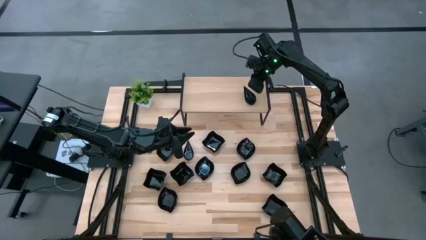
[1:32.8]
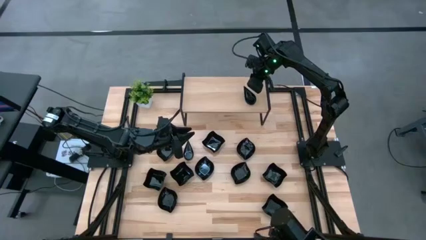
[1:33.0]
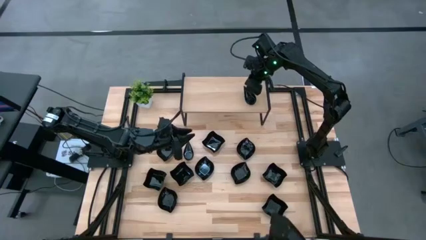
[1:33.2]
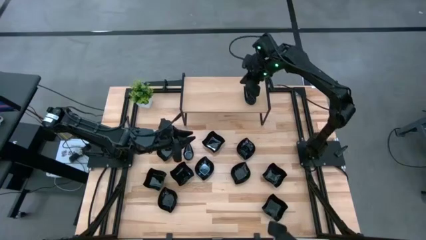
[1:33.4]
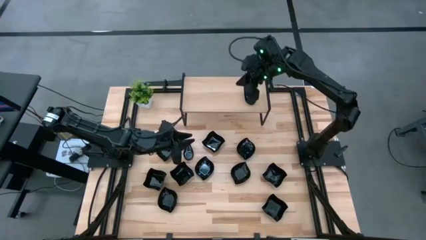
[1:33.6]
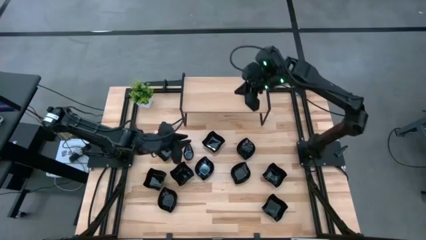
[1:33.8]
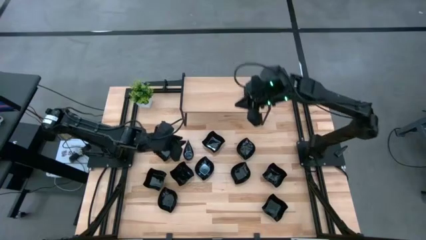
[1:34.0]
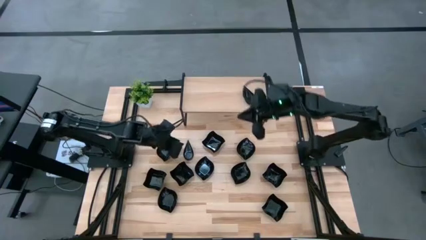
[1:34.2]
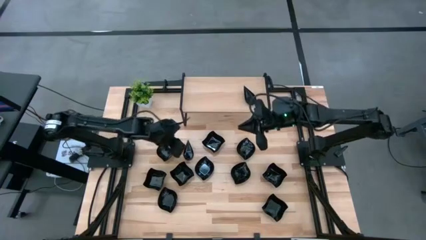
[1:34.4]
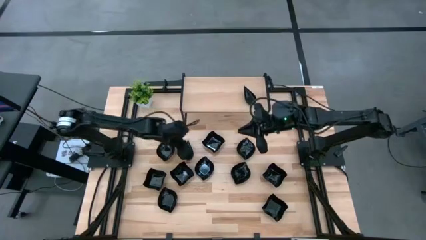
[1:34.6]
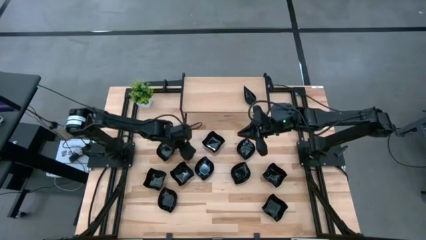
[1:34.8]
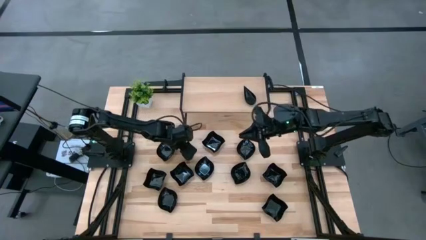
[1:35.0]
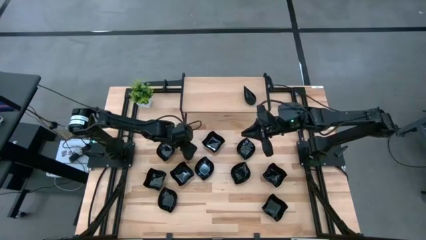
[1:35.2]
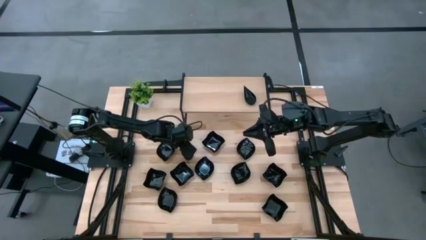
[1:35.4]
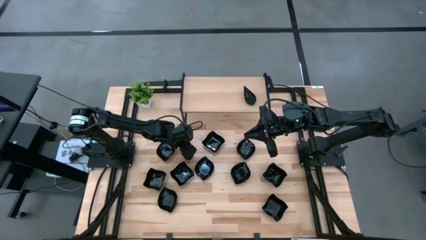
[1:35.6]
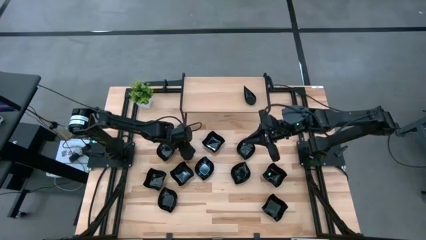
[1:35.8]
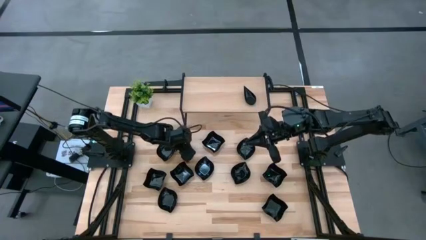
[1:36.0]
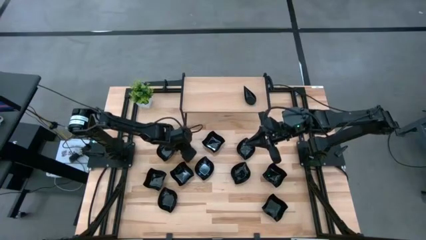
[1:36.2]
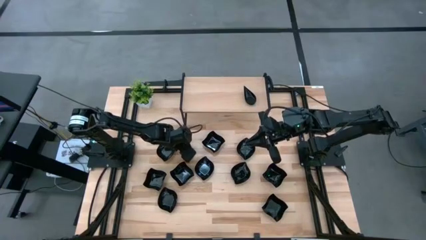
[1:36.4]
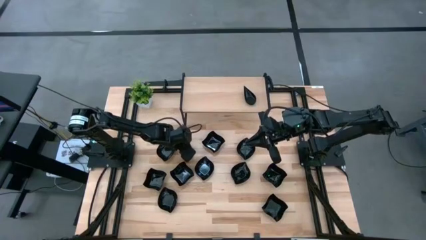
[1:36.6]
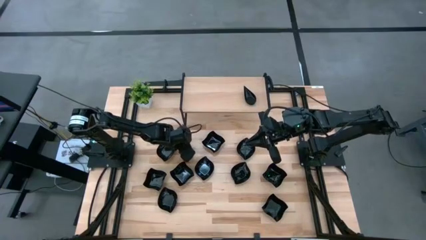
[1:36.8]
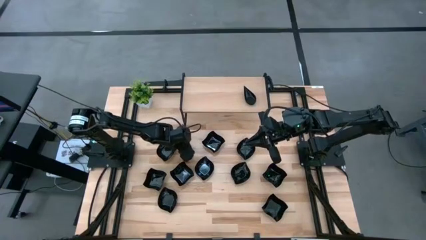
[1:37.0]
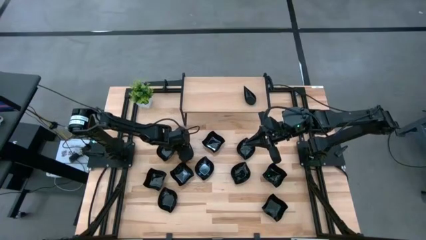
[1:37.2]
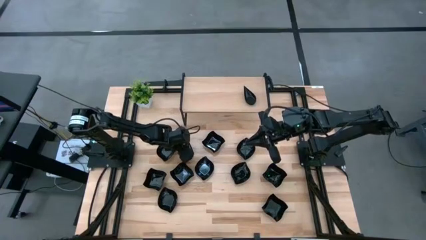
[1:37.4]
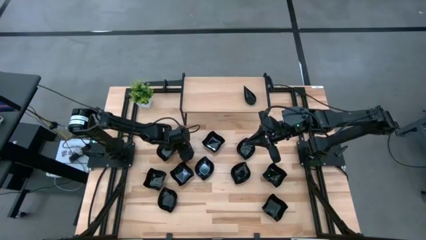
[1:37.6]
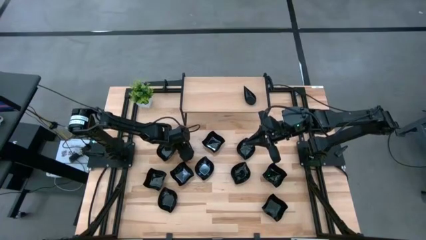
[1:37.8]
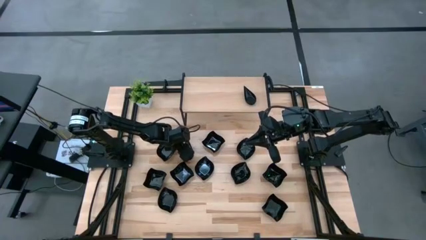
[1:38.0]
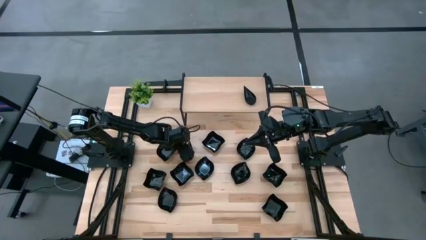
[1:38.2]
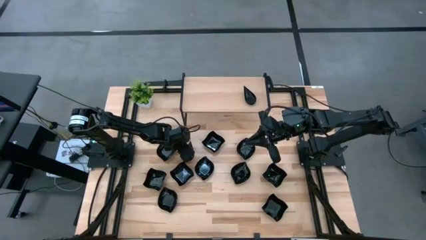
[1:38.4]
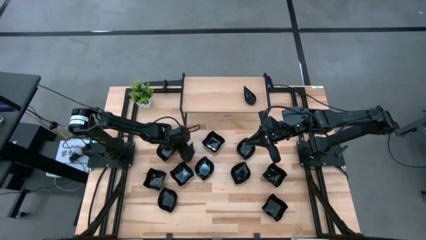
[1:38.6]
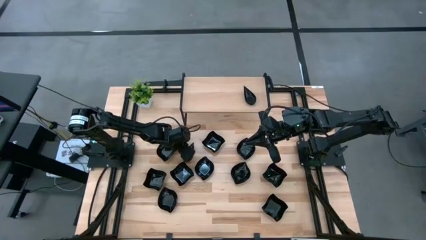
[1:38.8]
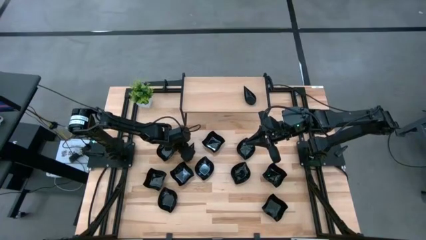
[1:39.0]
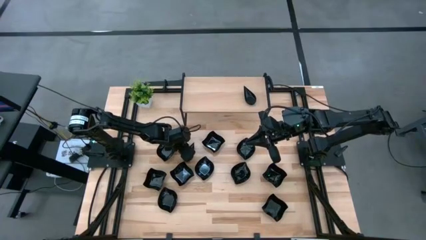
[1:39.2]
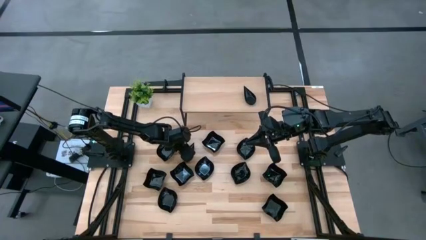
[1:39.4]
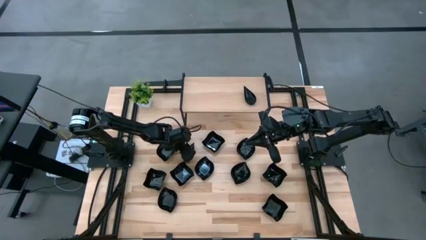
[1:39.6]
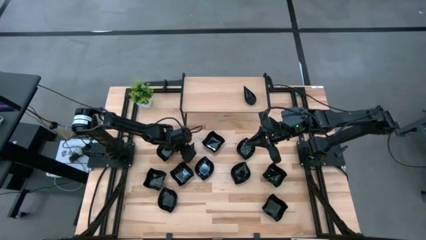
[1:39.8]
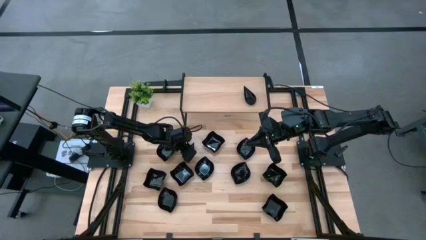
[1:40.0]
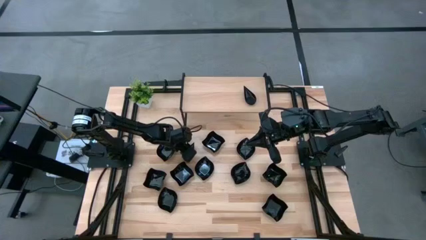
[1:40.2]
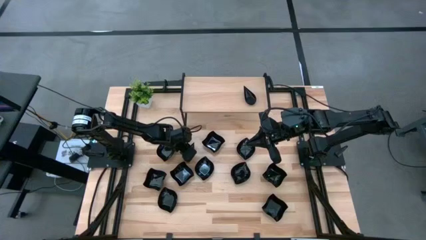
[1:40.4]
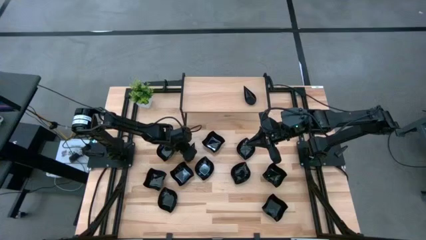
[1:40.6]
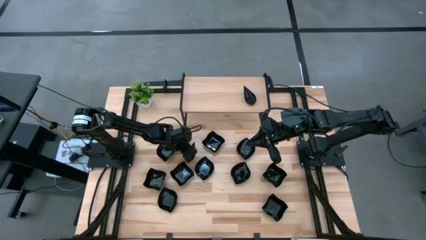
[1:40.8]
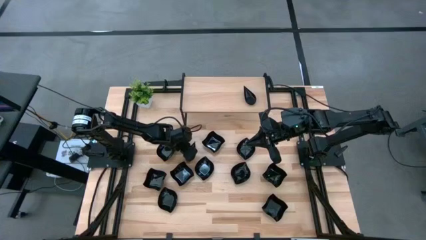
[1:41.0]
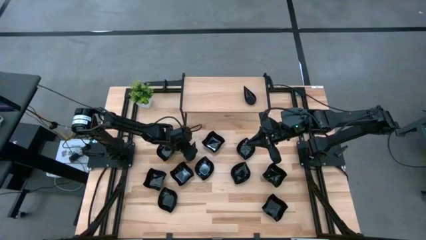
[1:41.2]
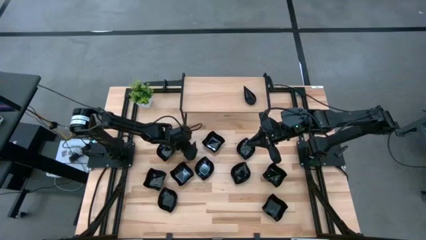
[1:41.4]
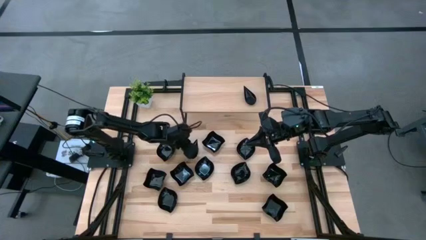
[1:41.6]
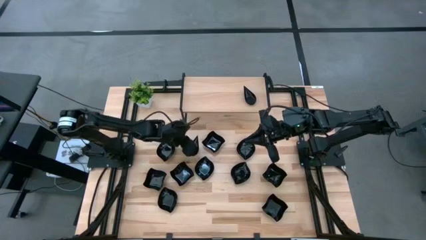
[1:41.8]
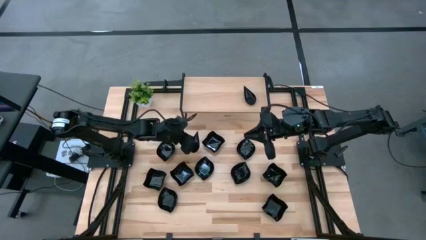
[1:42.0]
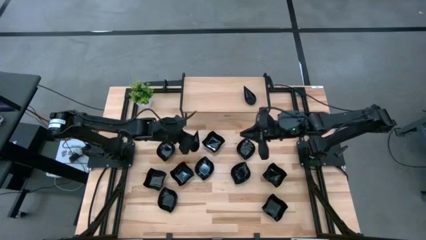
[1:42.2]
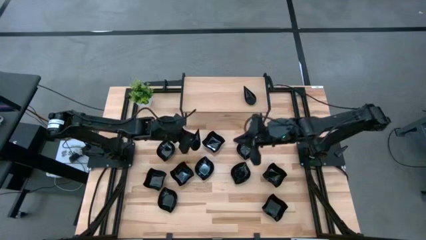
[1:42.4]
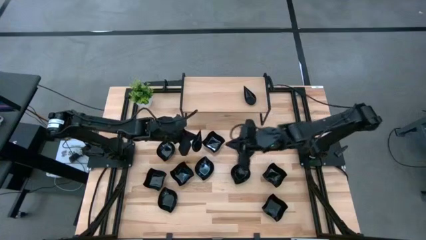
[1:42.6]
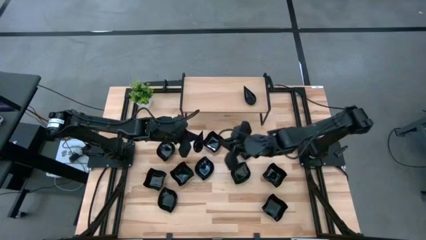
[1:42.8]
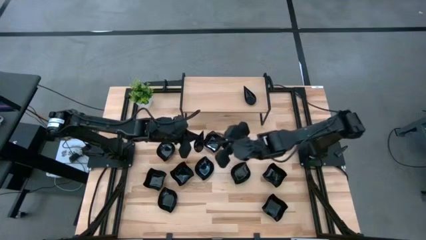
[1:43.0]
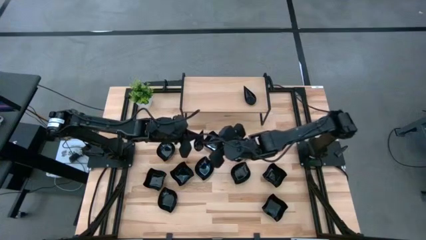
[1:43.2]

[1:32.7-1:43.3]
Task: Pick & Place Mini shaped plates
Stack the black drop shaped plate on top of the black drop shaped plate on the shelf
